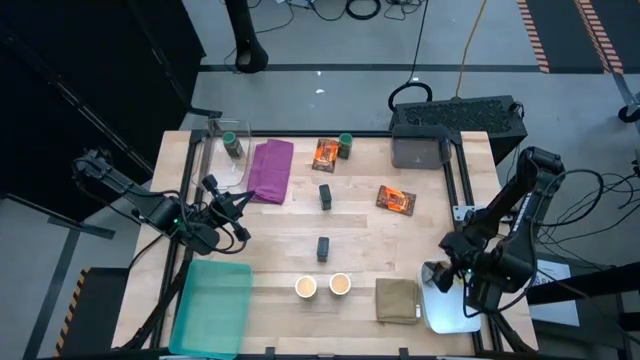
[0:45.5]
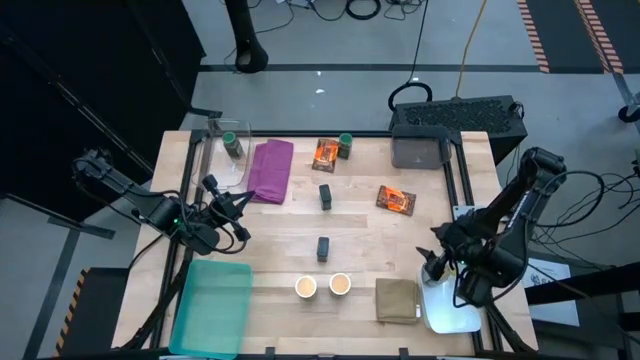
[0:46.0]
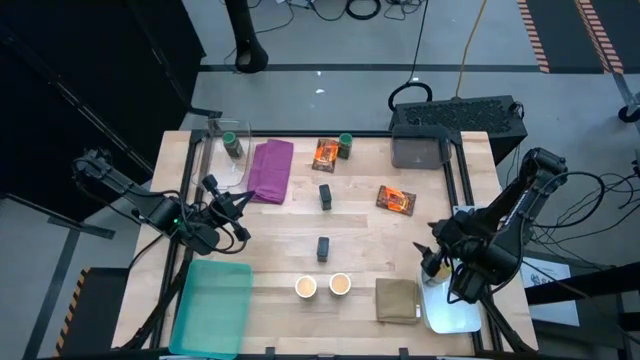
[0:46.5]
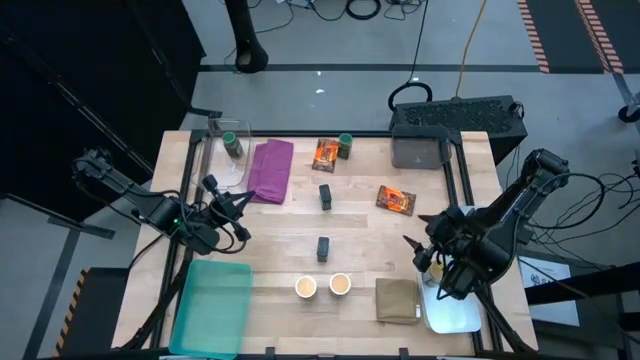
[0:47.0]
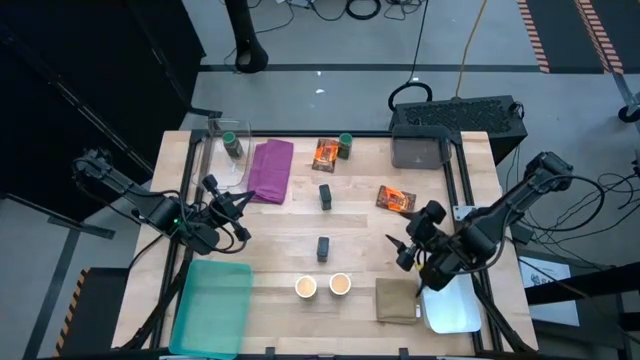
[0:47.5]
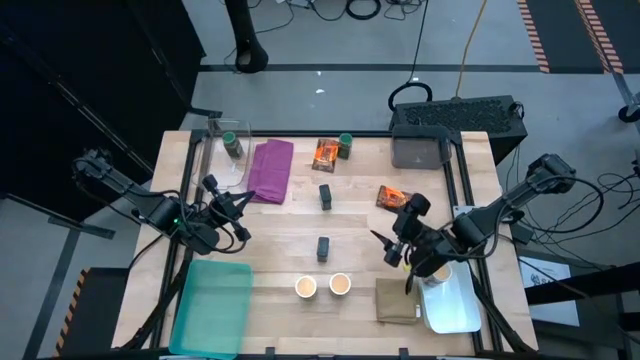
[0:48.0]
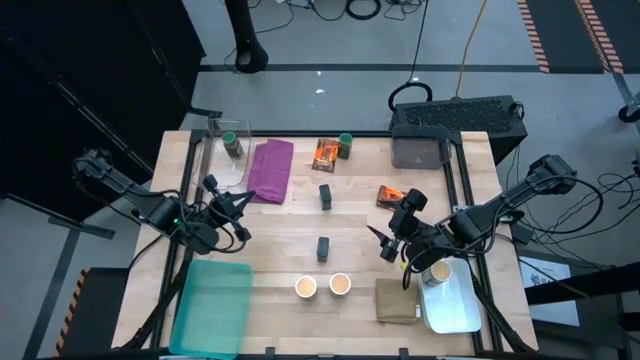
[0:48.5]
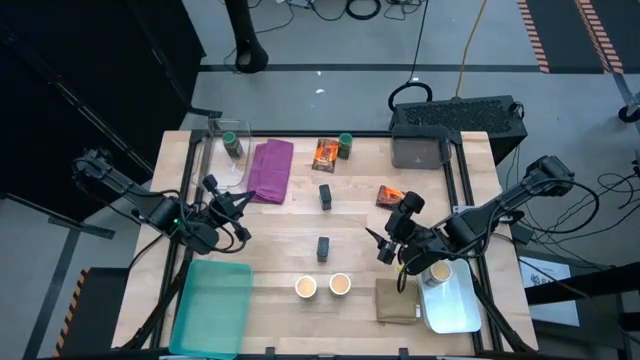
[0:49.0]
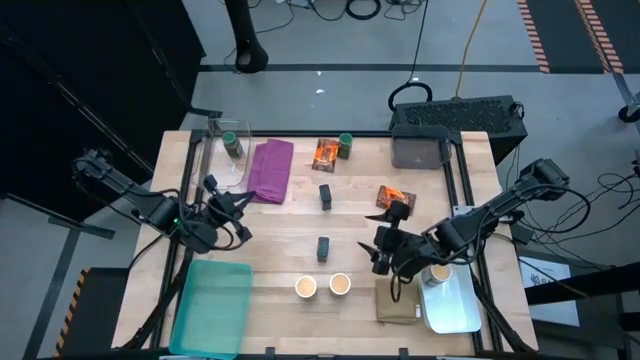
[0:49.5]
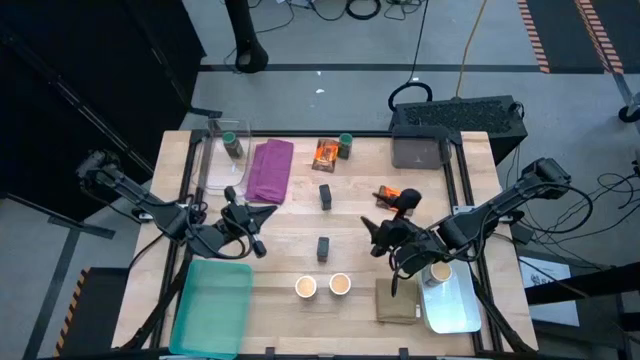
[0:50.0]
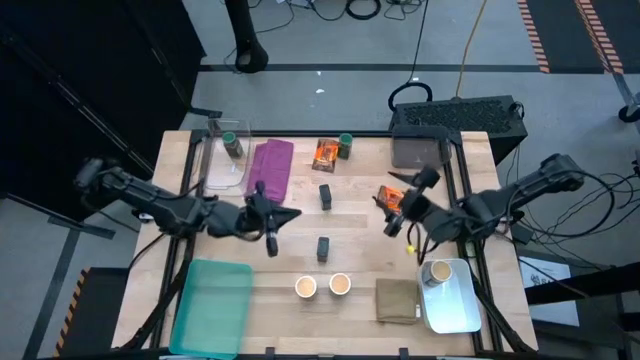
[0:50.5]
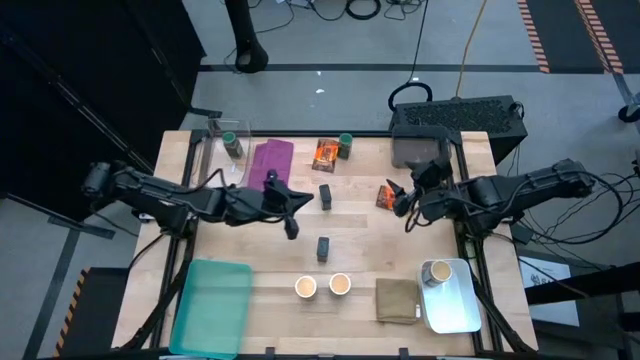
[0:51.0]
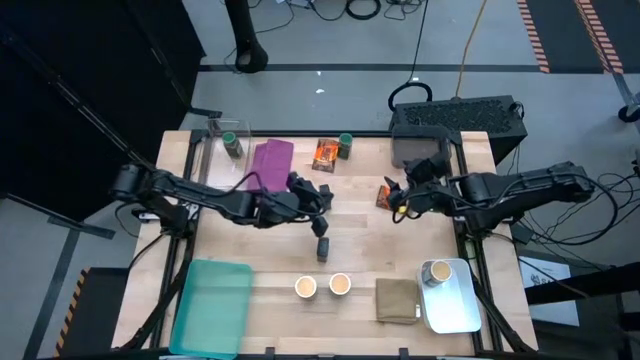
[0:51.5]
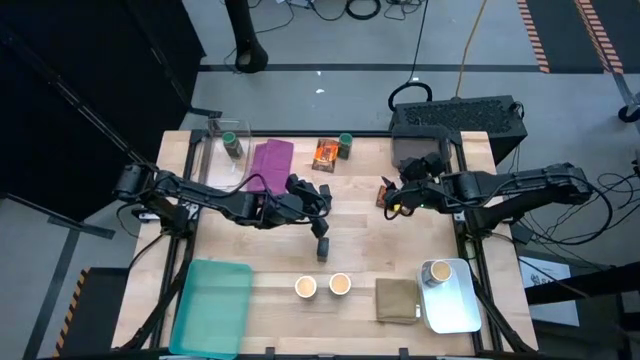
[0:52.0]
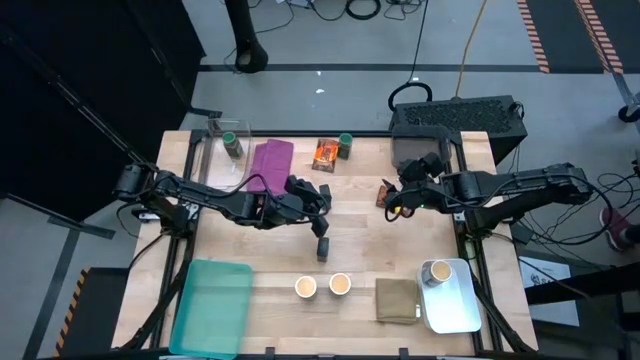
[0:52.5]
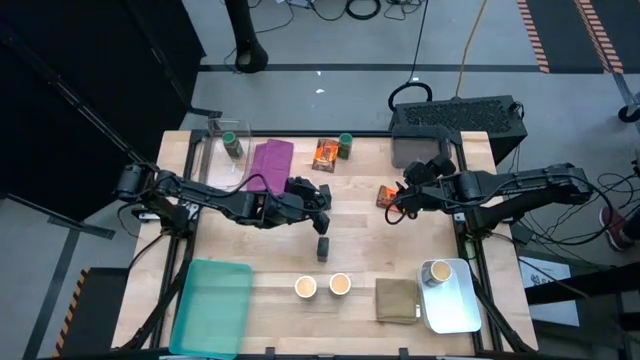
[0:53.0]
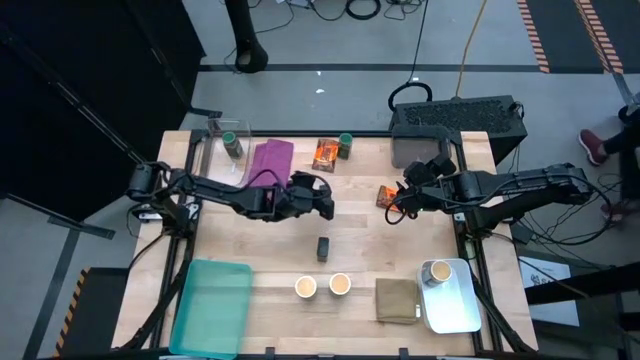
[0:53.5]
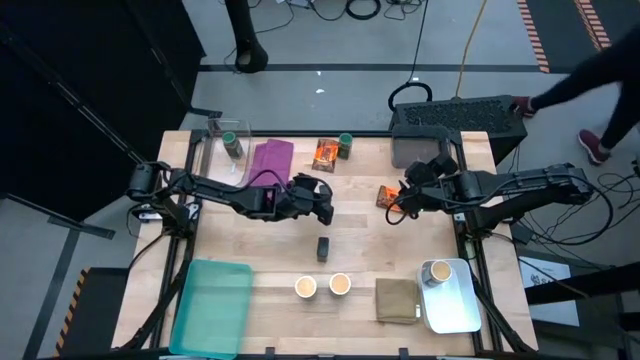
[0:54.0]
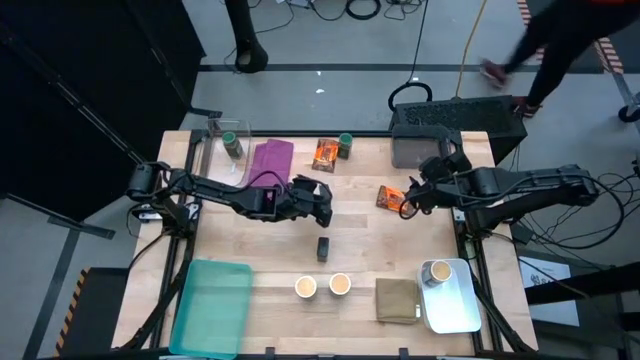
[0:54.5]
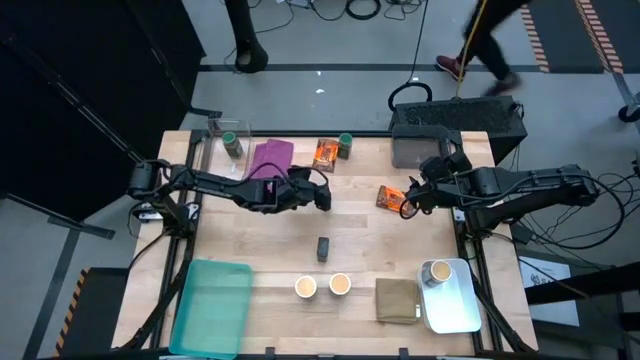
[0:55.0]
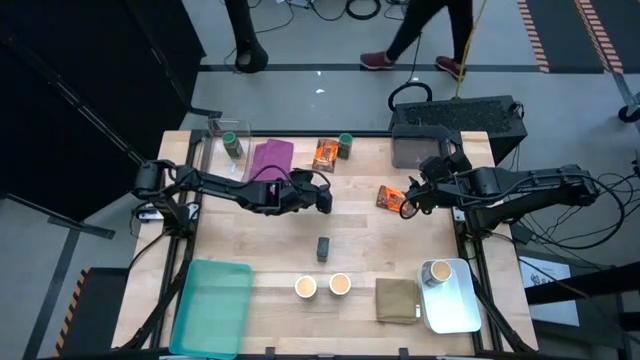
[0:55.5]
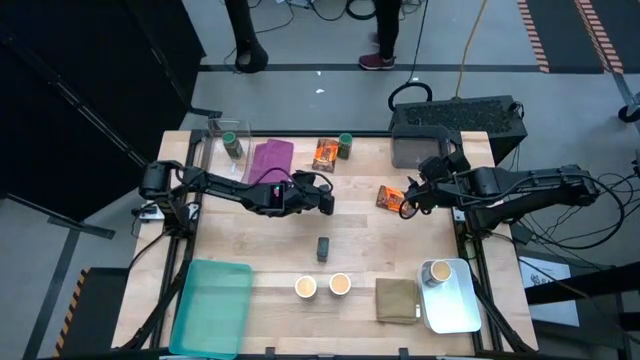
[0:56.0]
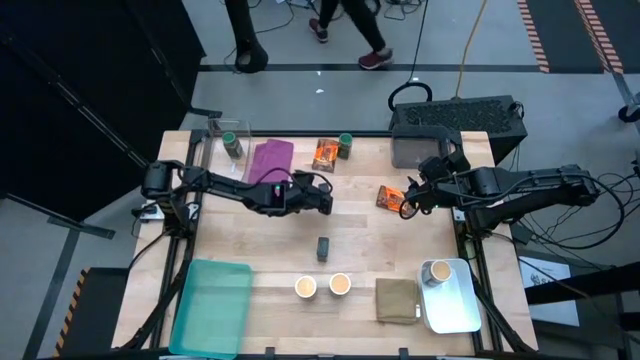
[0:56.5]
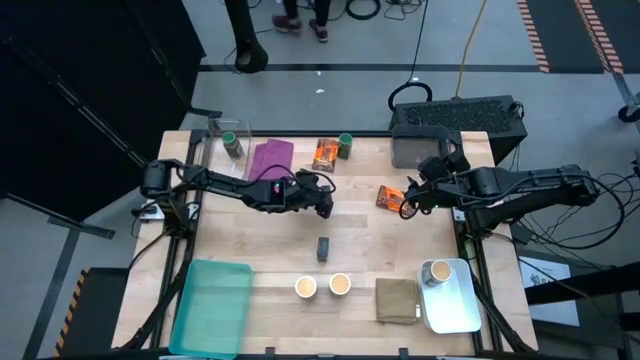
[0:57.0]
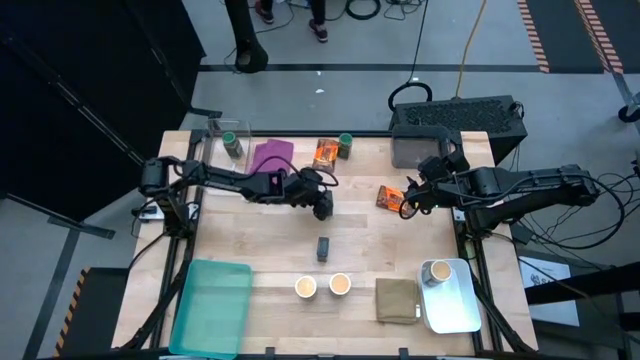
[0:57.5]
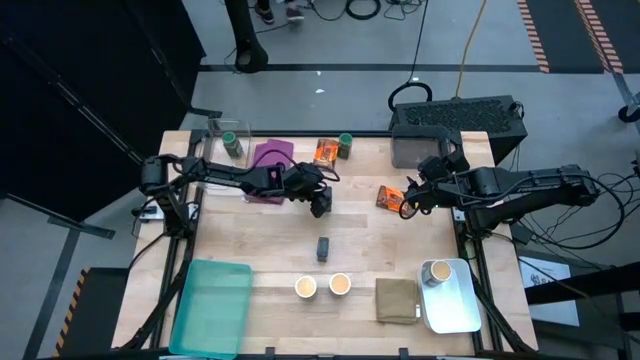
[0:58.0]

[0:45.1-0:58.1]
Task: Sort spices by type
Put the top black seasoning can into the light blue bin

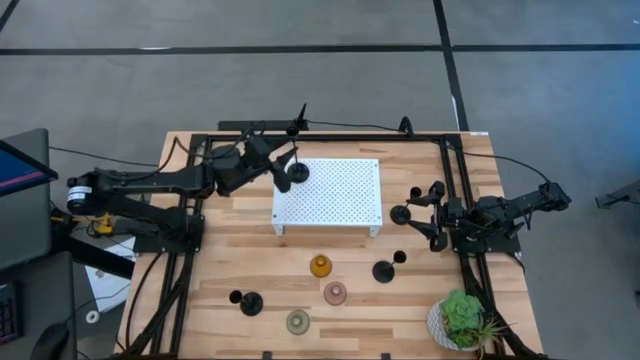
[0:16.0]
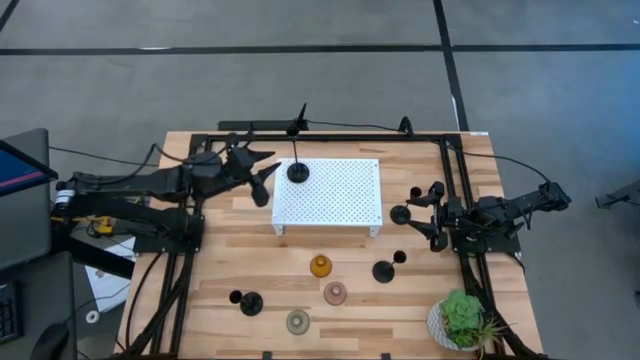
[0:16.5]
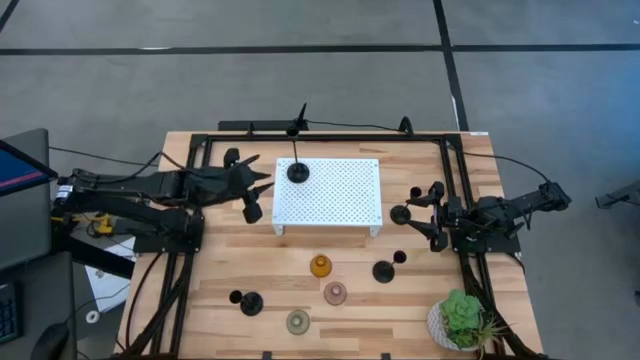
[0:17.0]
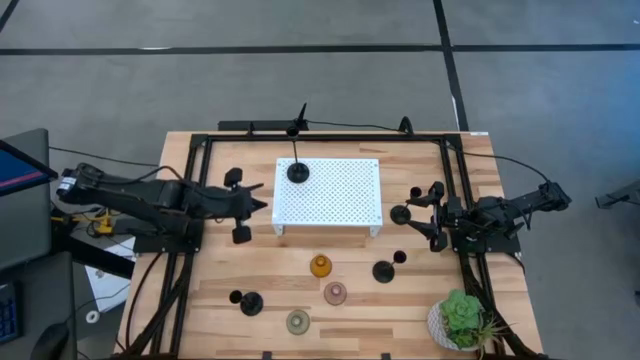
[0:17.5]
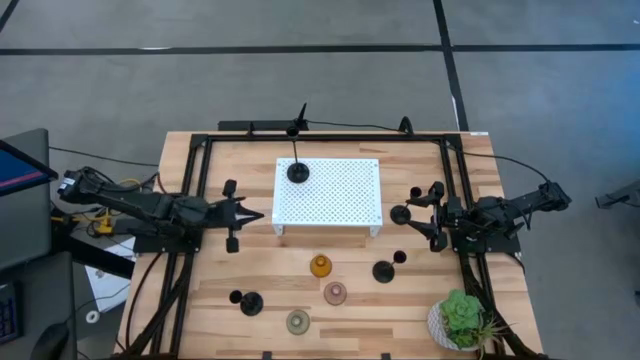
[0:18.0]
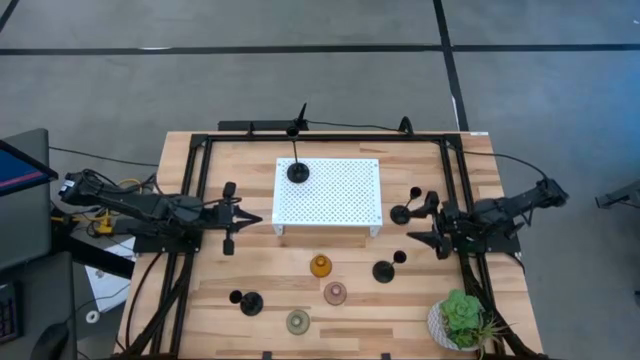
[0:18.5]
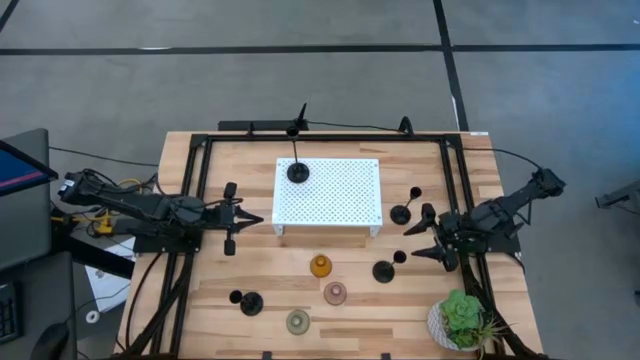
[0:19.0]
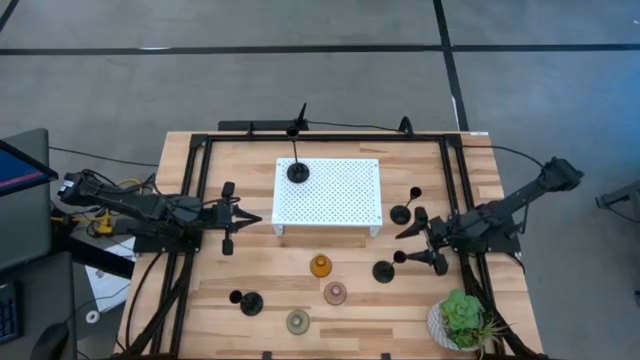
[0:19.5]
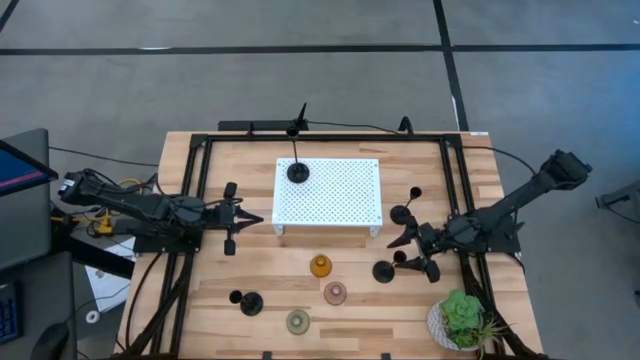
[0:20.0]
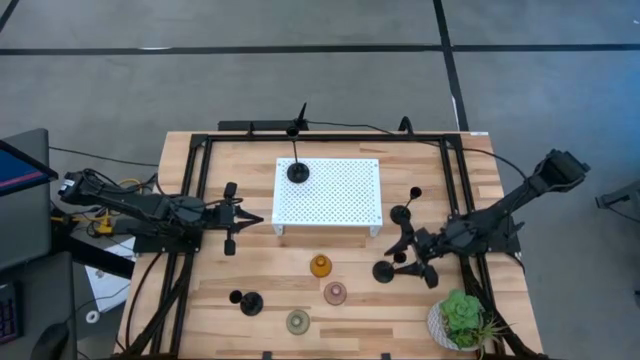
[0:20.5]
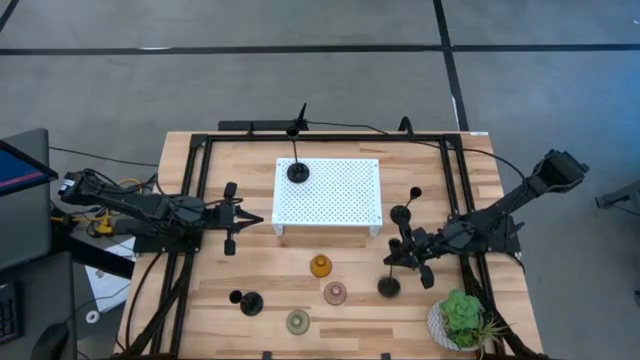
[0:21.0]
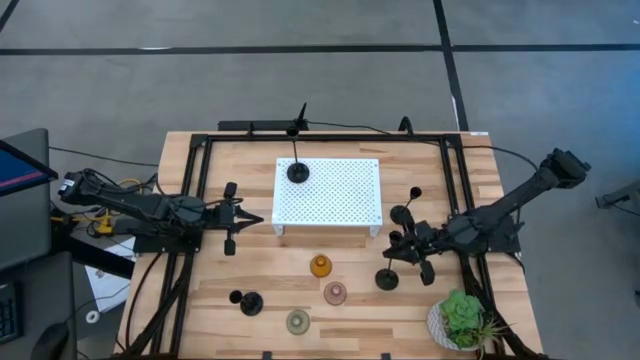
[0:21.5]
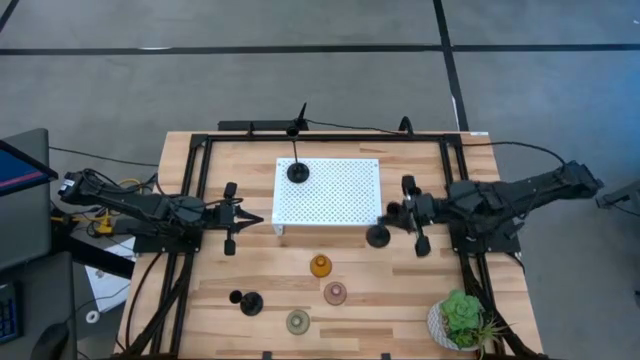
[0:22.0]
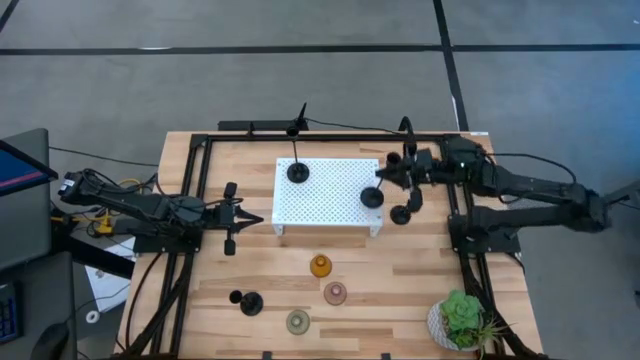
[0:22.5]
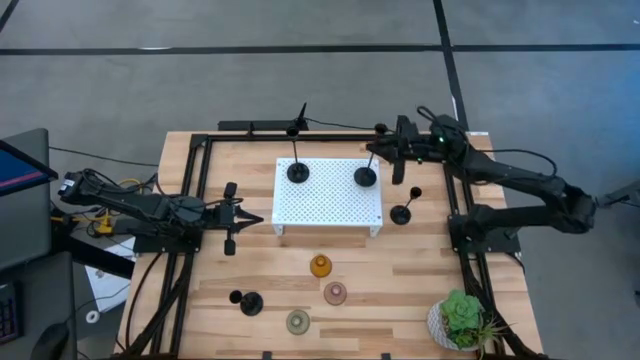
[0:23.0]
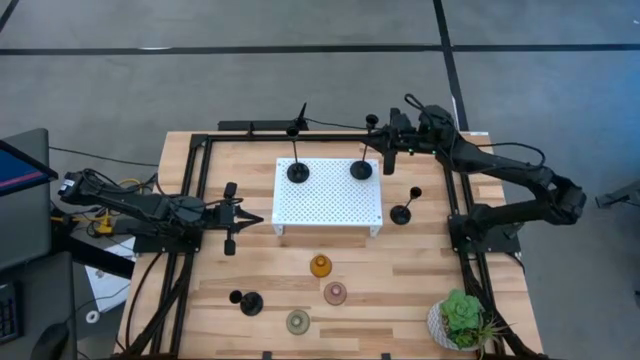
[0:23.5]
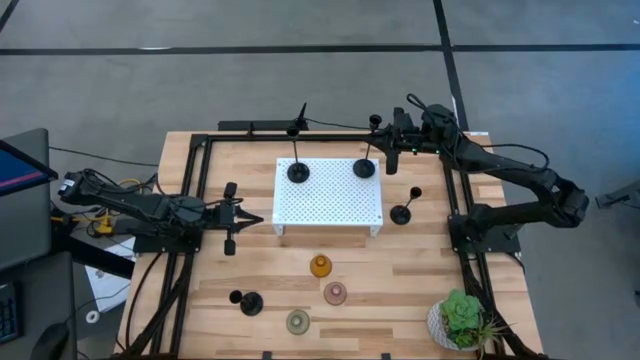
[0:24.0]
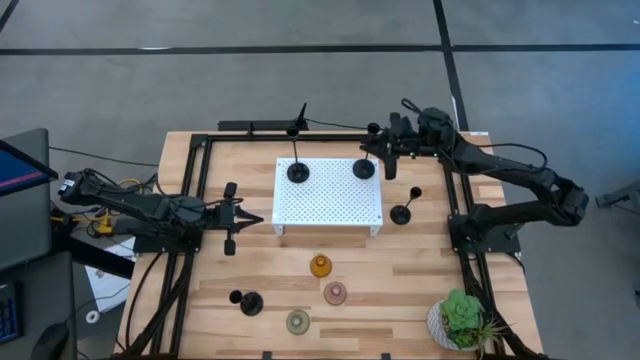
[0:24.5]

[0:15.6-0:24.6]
Task: Pick & Place candle stick holders
Put the black candle holder on the shelf
